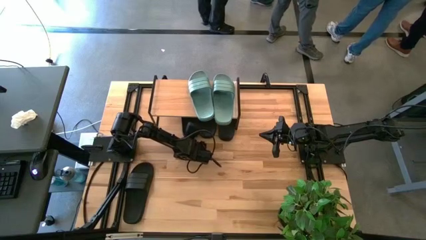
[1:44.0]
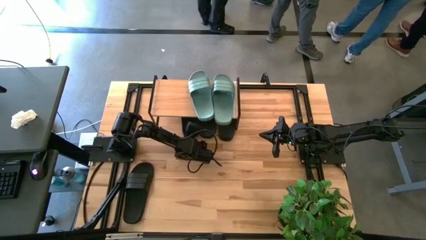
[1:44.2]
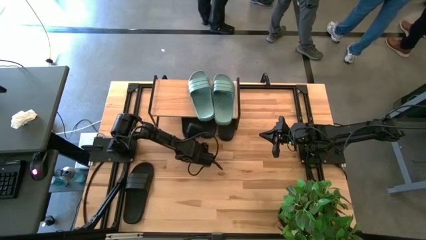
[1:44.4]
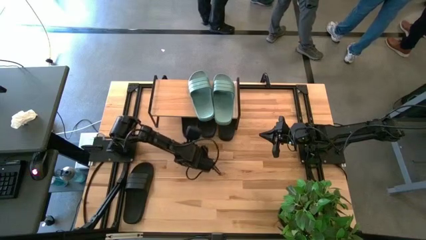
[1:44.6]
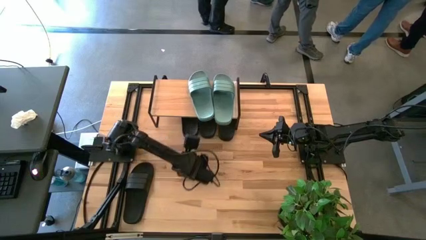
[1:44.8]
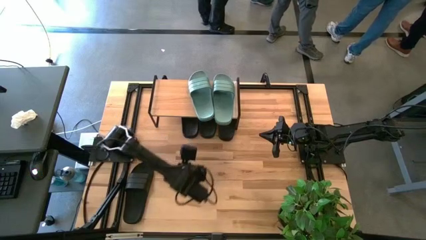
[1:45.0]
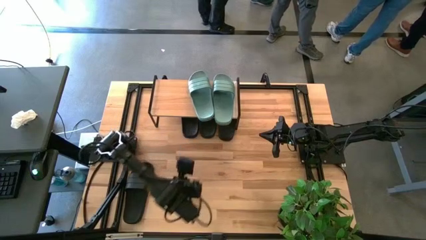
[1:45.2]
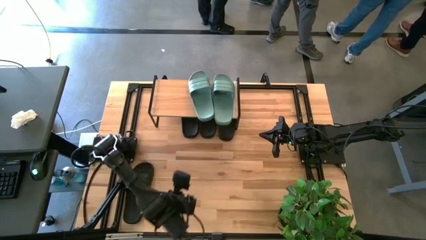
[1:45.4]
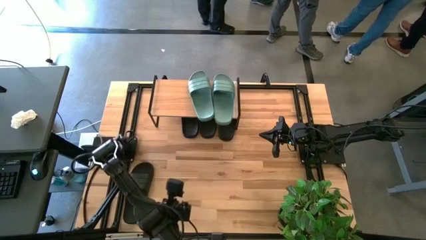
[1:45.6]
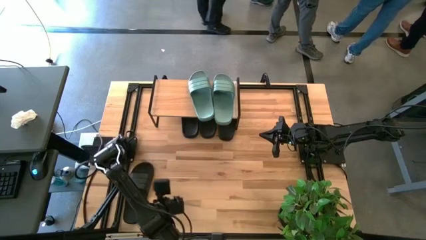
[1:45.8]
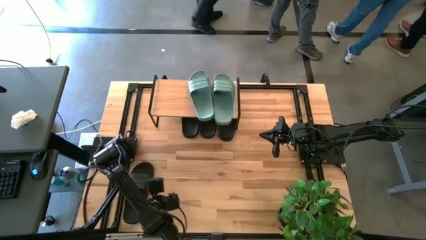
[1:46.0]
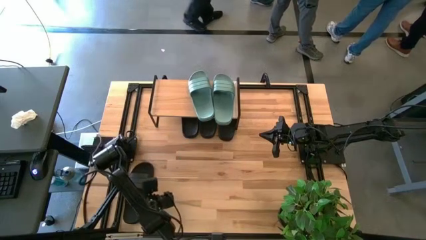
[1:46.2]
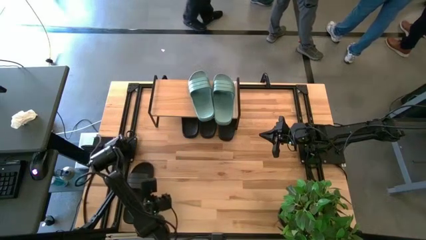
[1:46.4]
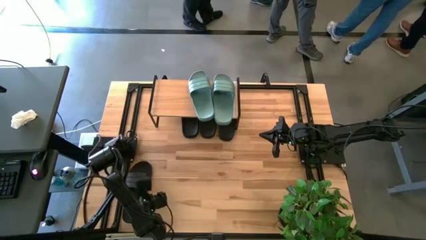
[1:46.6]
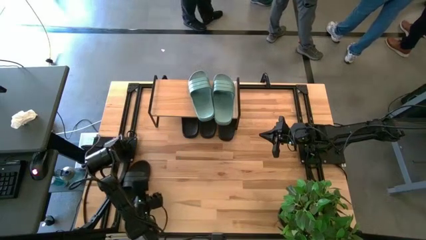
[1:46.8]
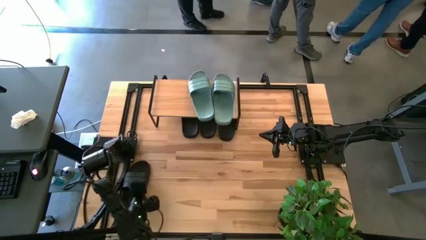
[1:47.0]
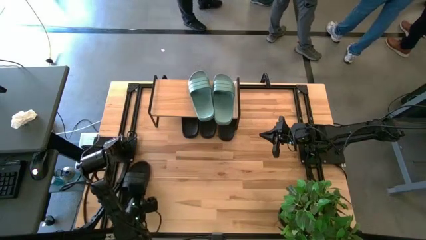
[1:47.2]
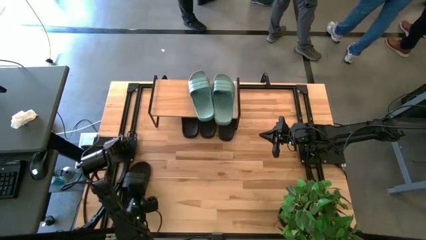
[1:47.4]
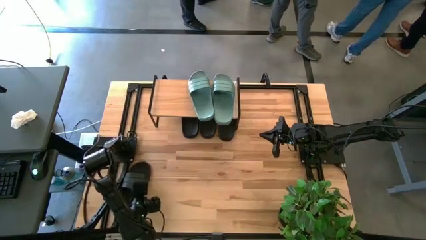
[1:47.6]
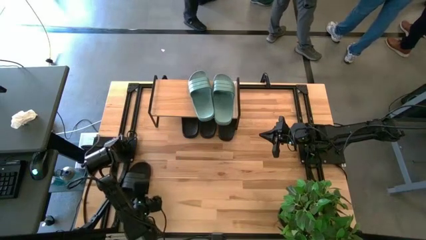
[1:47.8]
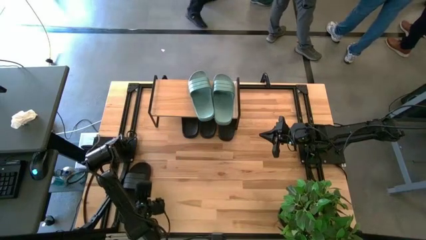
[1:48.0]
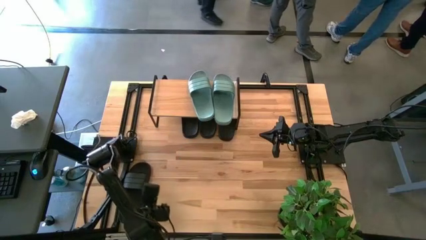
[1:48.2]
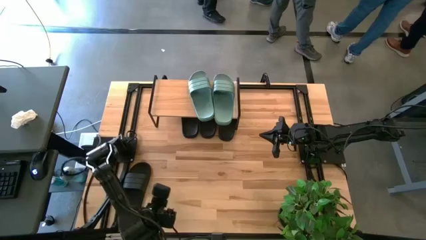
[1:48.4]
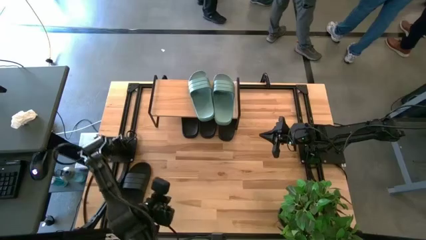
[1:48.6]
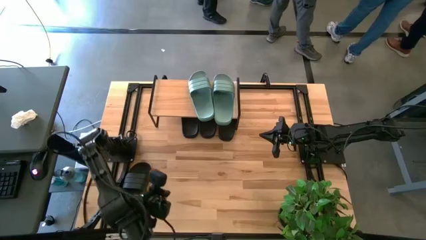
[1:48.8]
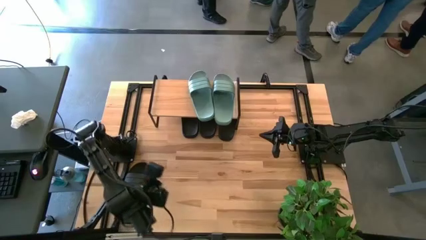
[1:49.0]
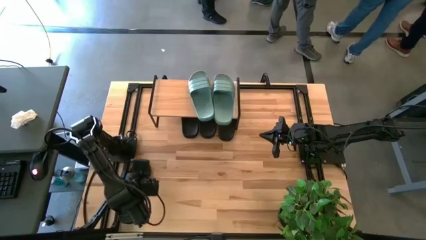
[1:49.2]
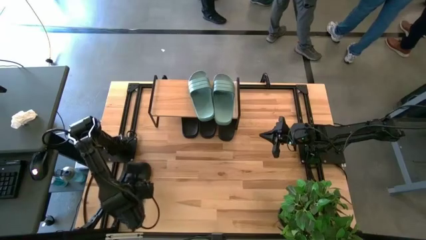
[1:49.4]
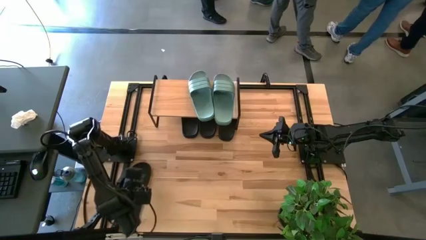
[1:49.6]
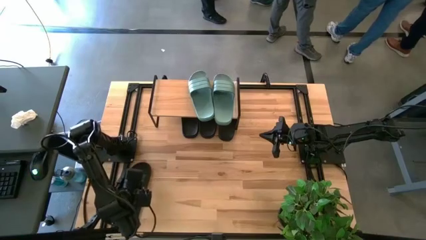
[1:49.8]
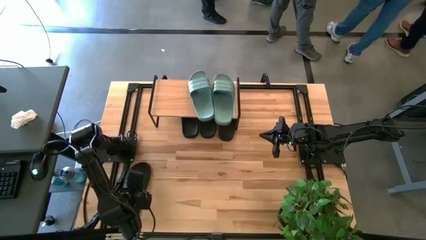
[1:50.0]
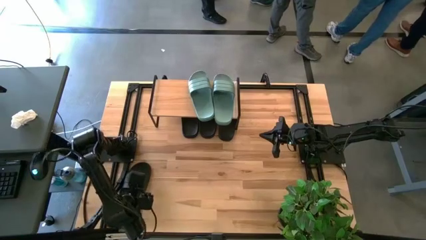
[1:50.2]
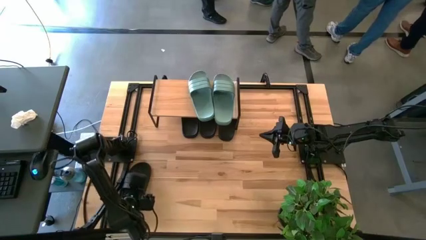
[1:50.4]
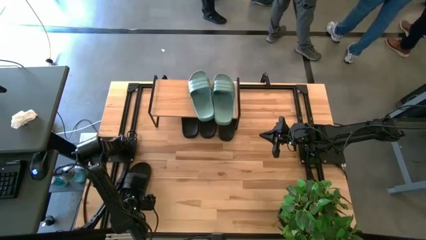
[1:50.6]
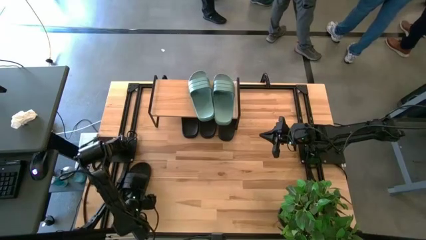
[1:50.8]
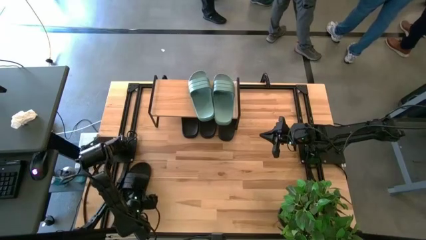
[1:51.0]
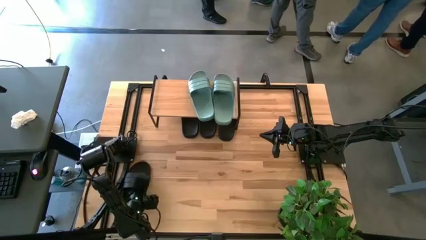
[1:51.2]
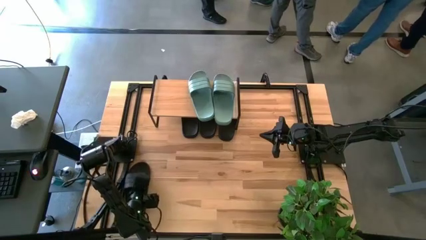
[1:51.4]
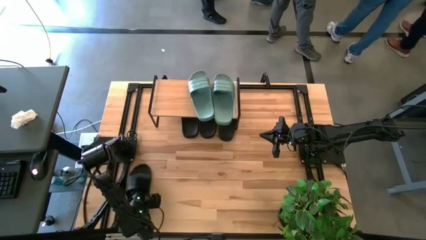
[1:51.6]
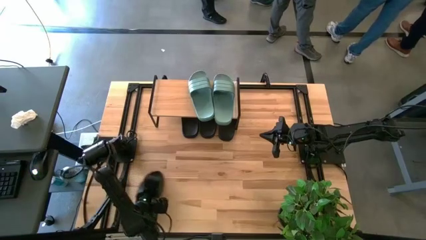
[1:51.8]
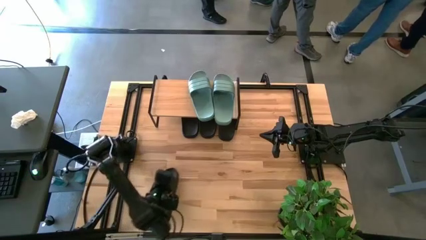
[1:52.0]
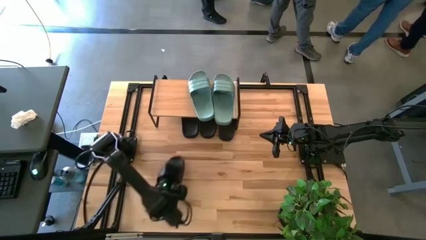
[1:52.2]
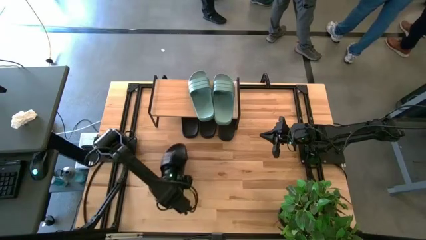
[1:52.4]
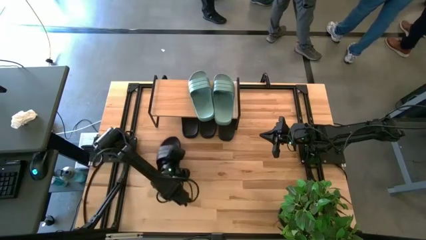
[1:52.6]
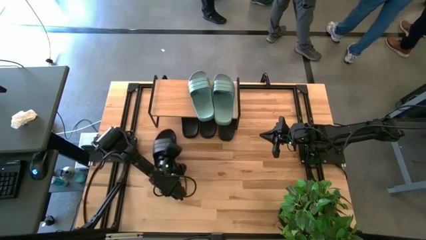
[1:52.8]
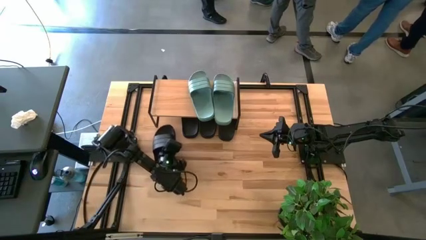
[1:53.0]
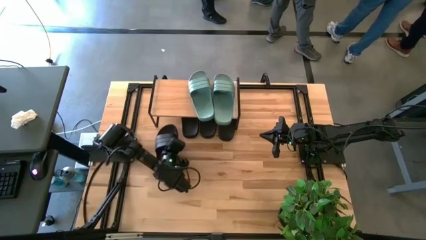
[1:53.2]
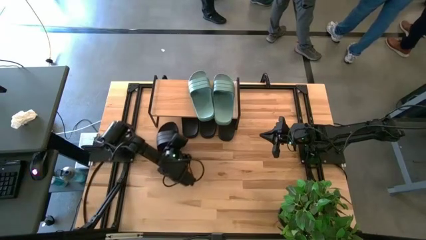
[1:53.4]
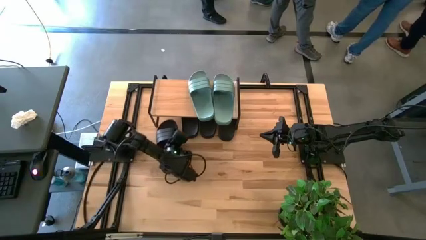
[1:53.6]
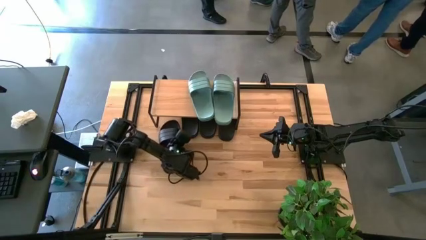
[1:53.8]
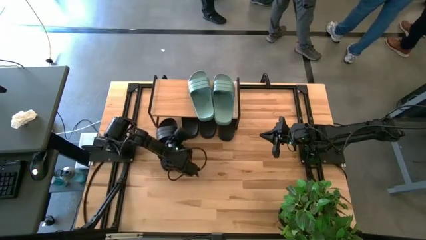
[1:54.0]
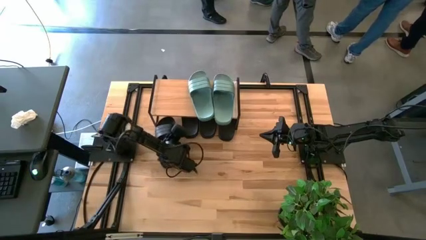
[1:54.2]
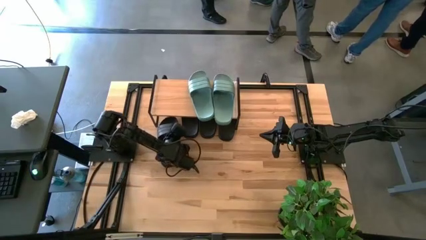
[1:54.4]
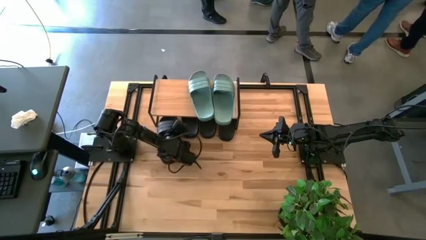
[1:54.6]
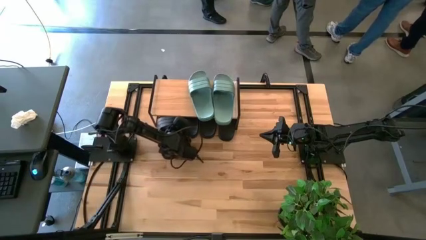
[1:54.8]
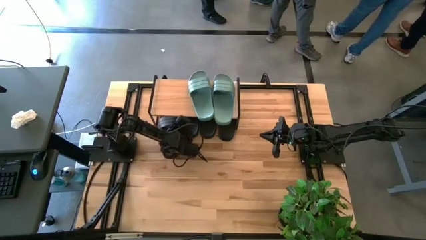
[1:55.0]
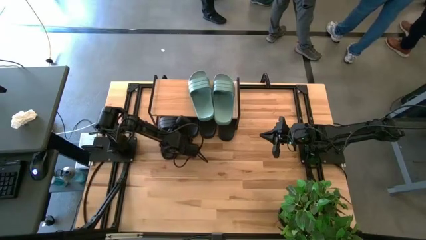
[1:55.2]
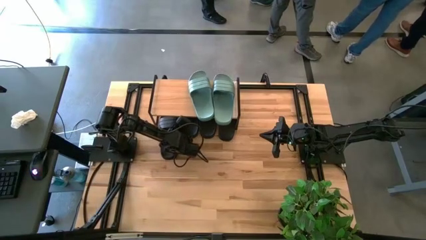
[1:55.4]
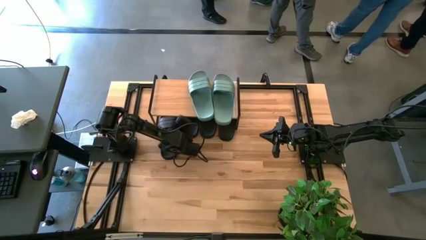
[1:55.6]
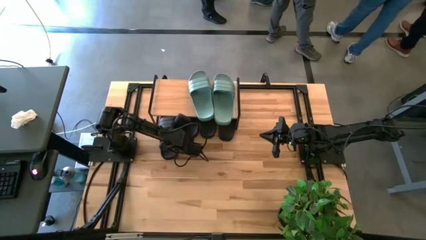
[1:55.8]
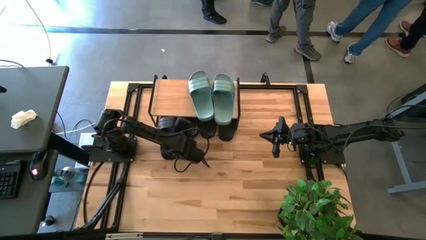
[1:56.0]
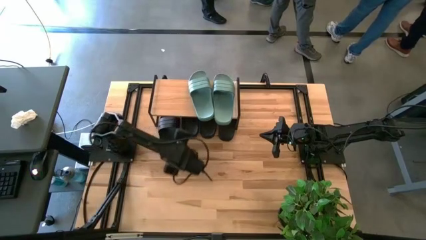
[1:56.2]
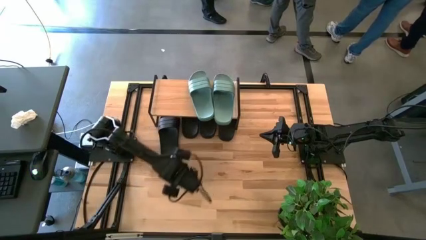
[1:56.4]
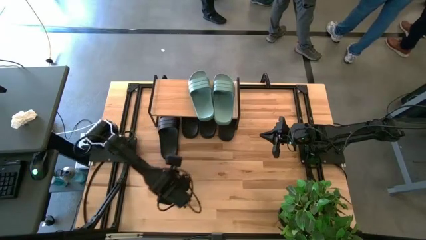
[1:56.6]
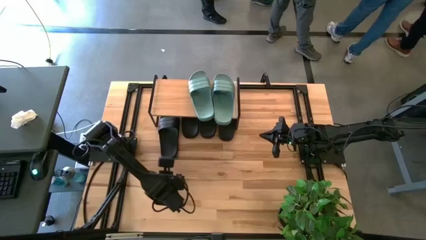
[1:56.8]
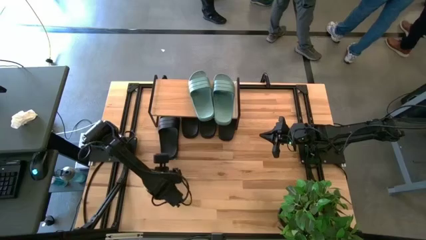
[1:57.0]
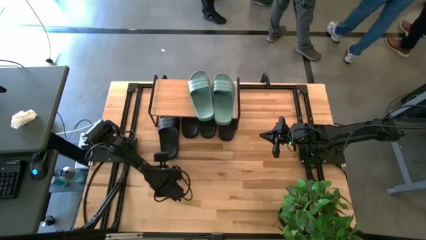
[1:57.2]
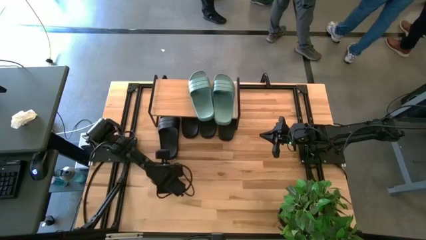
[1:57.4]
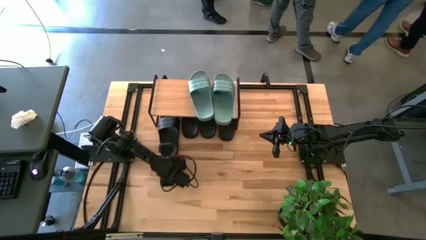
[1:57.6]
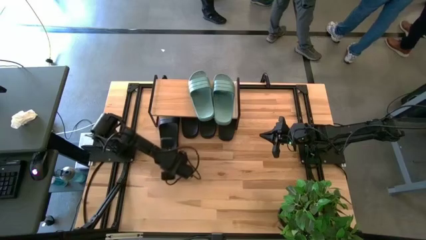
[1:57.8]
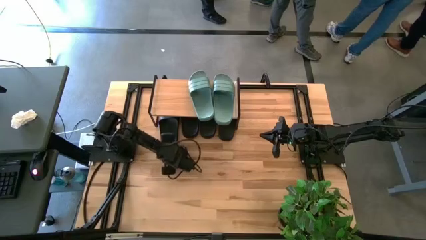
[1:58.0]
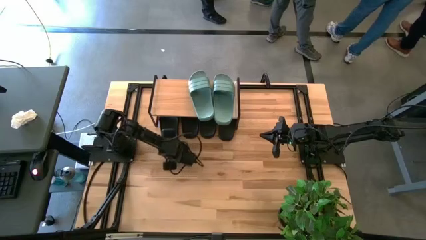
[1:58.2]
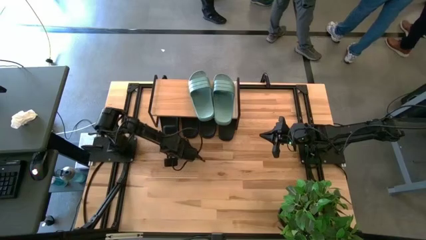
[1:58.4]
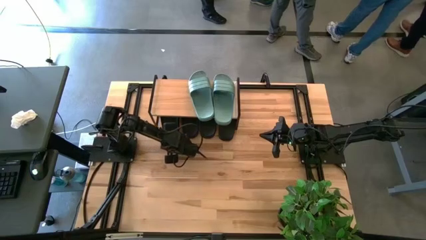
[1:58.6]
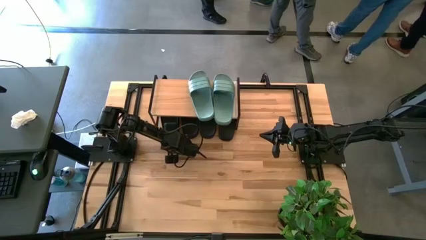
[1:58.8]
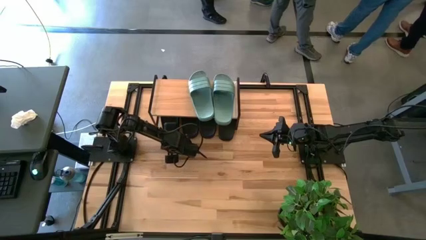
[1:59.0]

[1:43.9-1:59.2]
Task: Pick and place slides into the shelf
Put the black slide under the shelf
